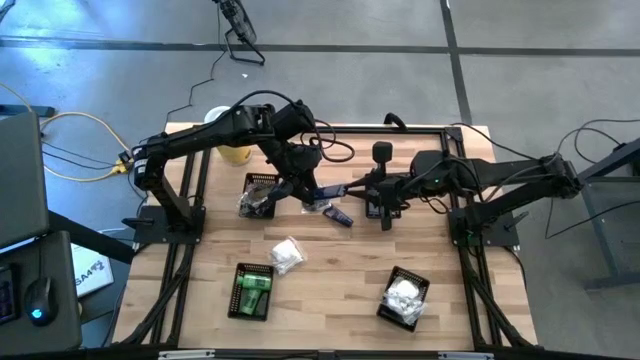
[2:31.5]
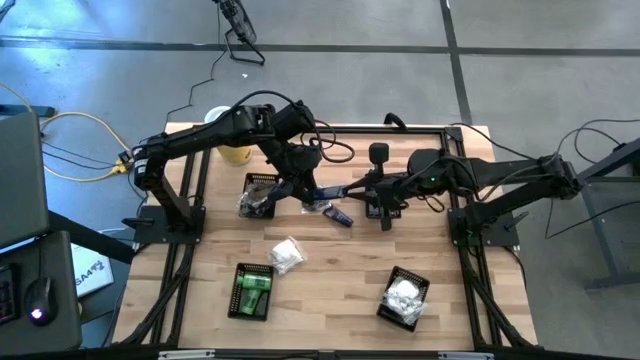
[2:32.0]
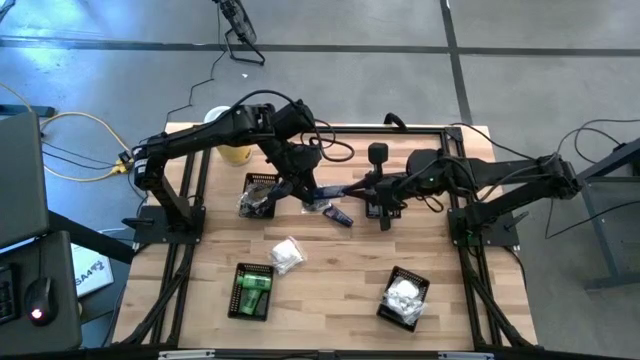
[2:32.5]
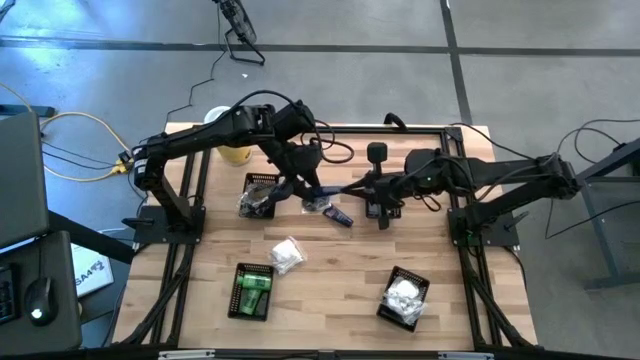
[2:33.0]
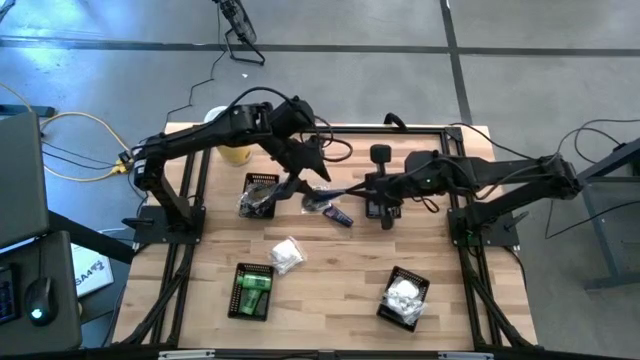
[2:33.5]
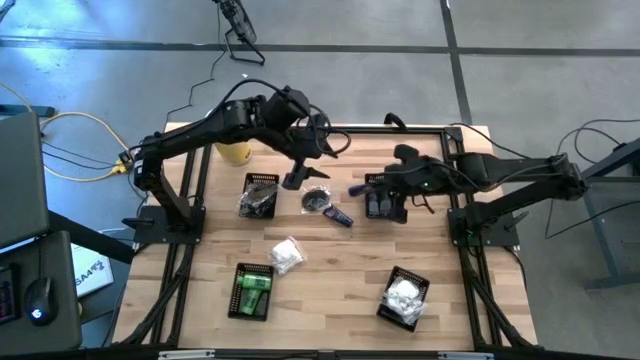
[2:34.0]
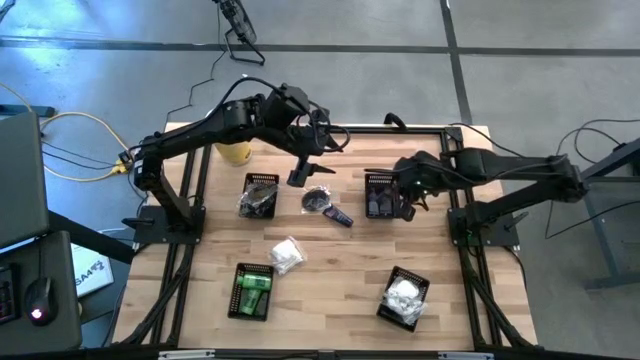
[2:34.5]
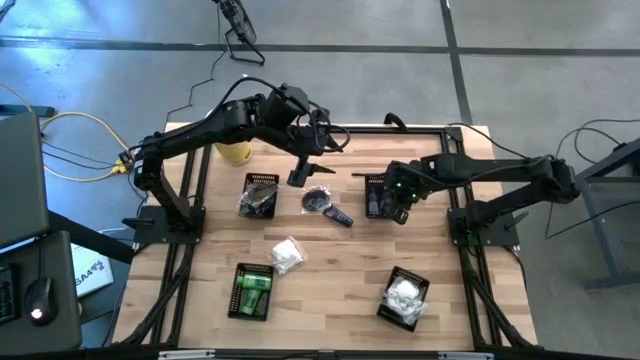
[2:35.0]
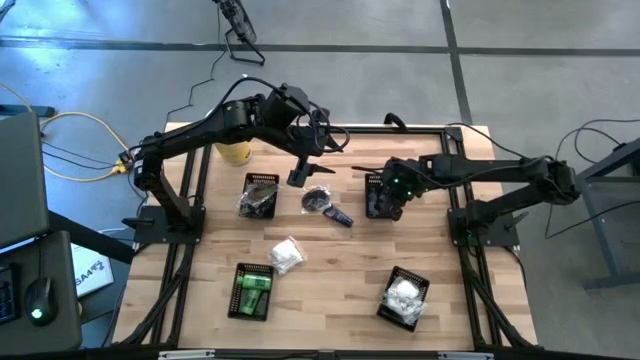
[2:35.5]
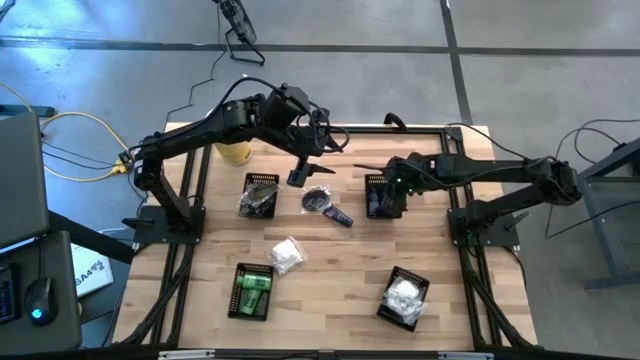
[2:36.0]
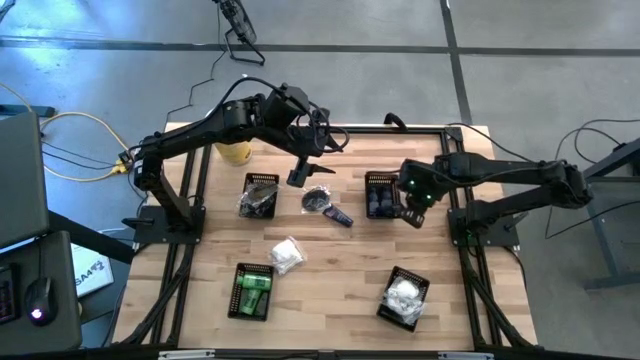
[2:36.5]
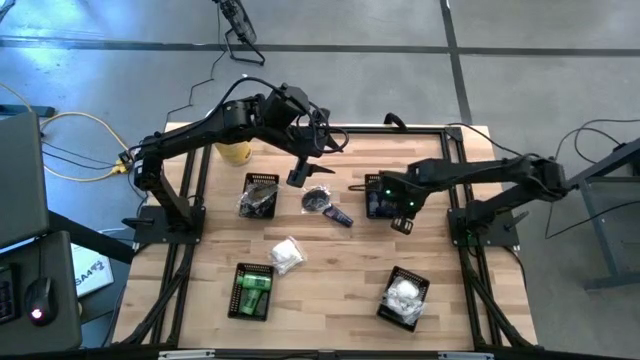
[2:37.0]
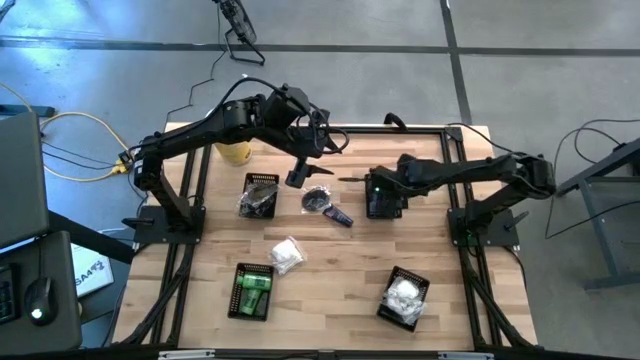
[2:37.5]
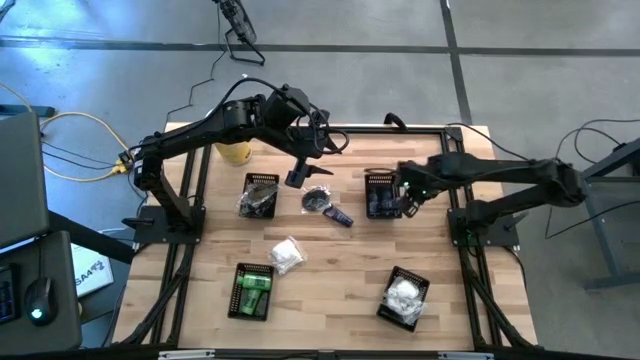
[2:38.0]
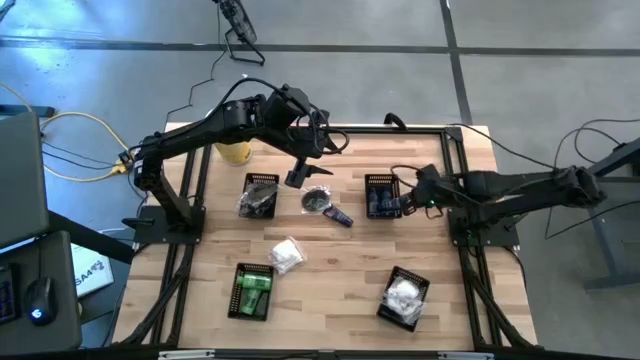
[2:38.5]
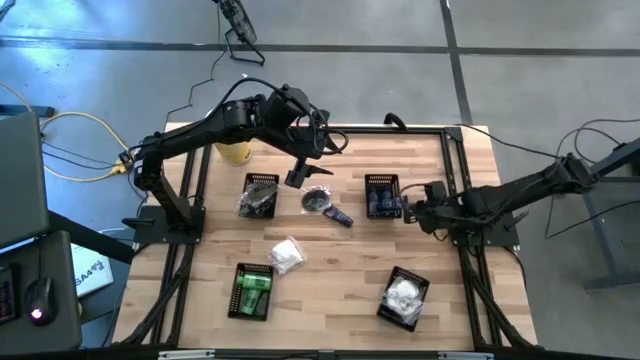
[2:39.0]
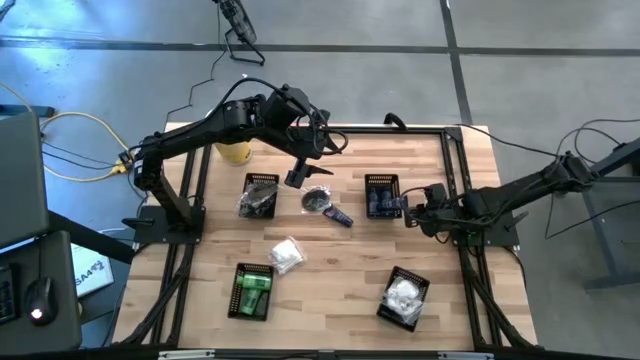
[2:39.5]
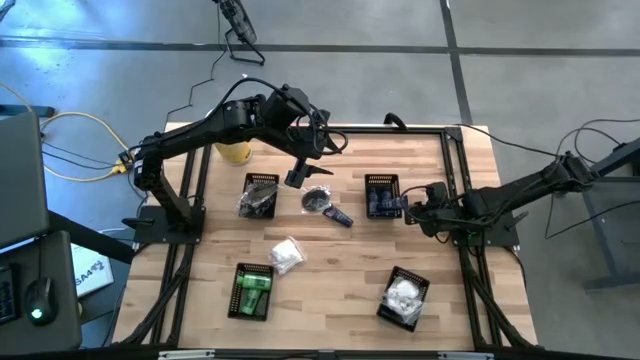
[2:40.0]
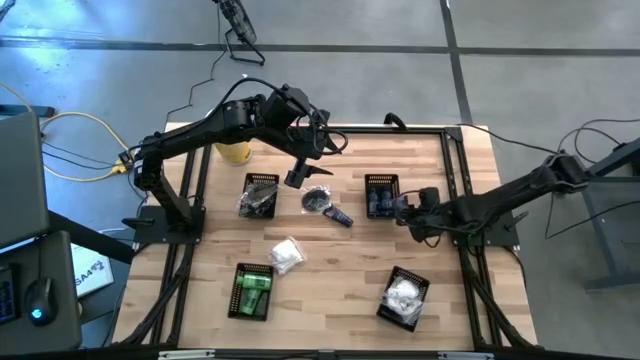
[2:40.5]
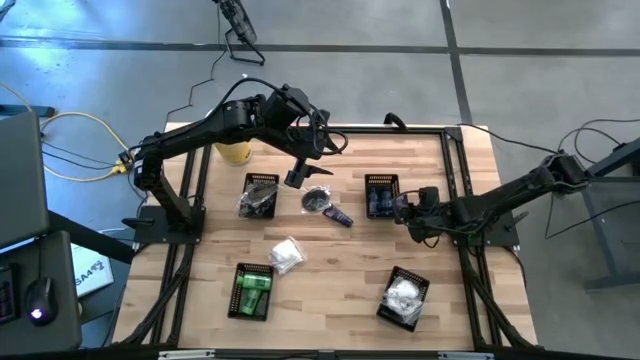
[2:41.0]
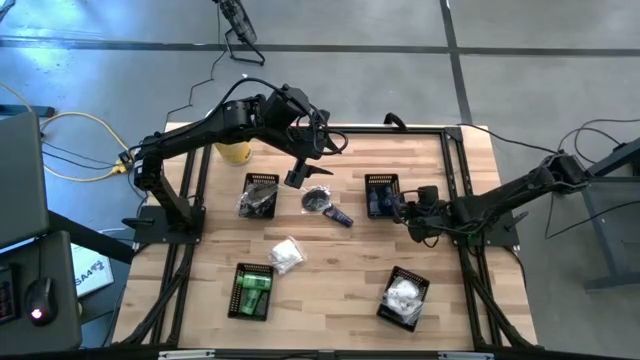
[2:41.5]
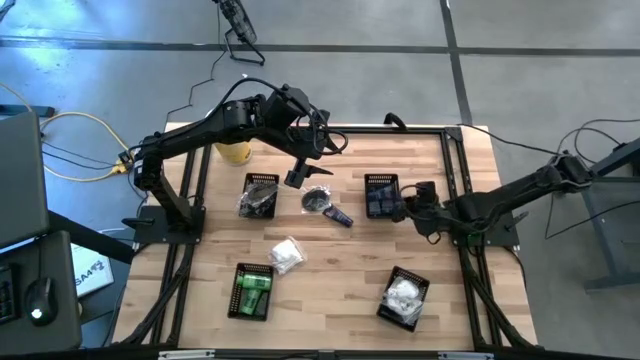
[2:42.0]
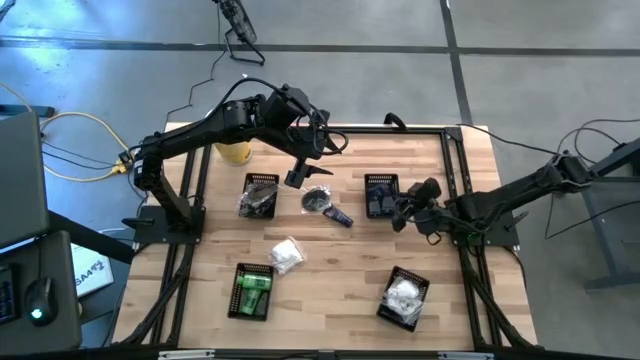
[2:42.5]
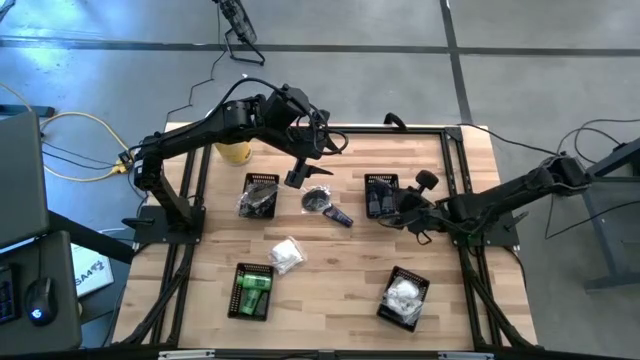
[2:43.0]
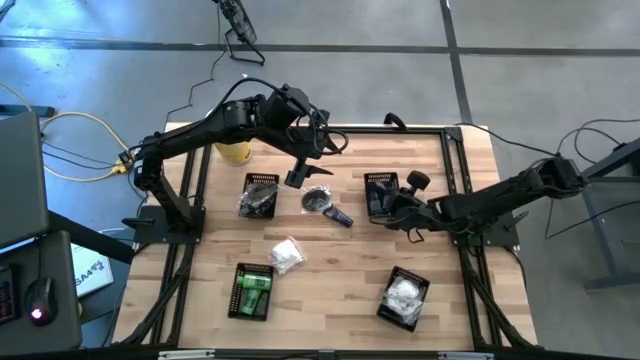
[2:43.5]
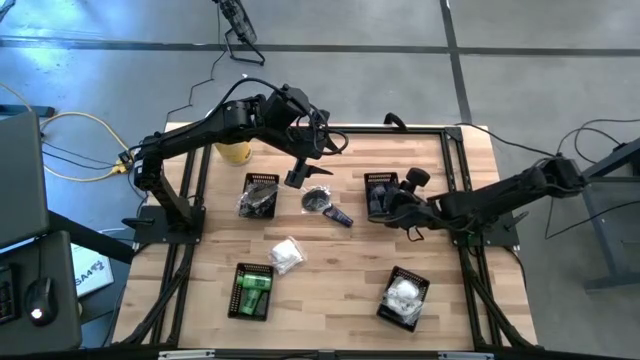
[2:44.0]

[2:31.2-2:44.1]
Task: Pick & Place Travel size toiletries
Put the blue shave cream into the top right black basket

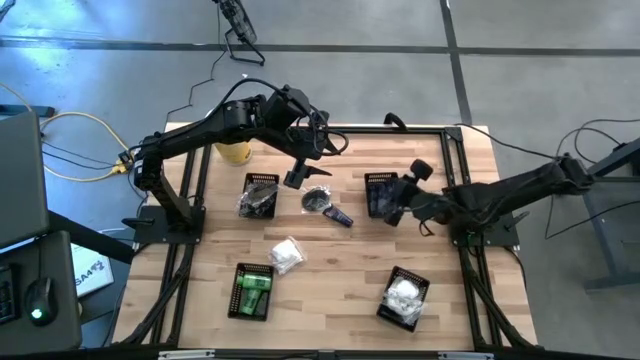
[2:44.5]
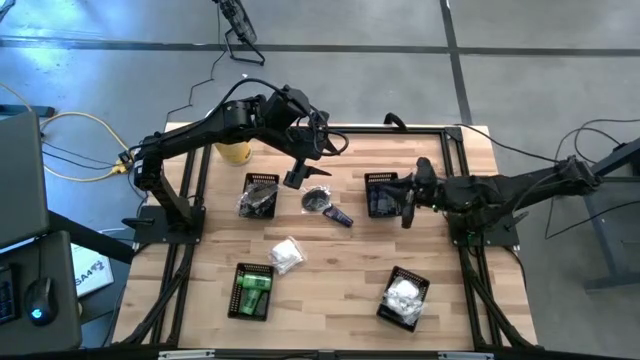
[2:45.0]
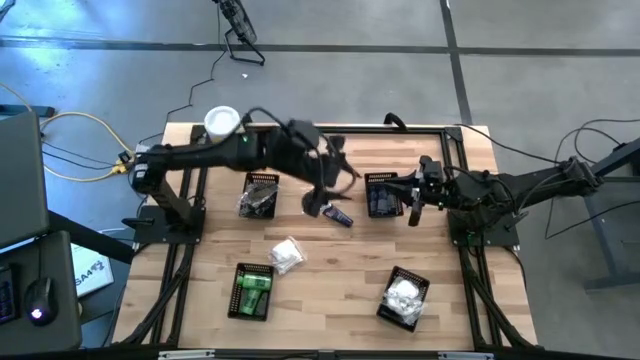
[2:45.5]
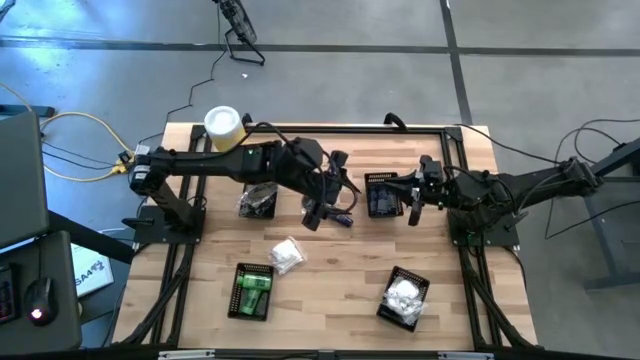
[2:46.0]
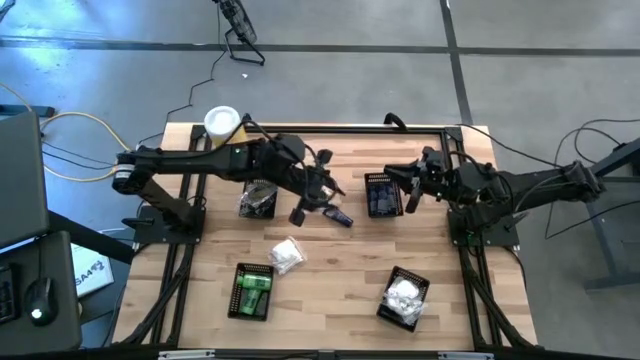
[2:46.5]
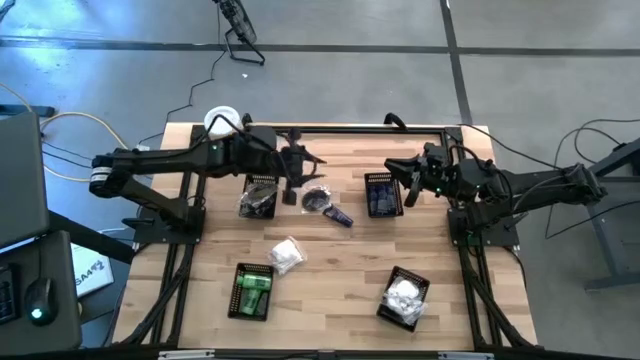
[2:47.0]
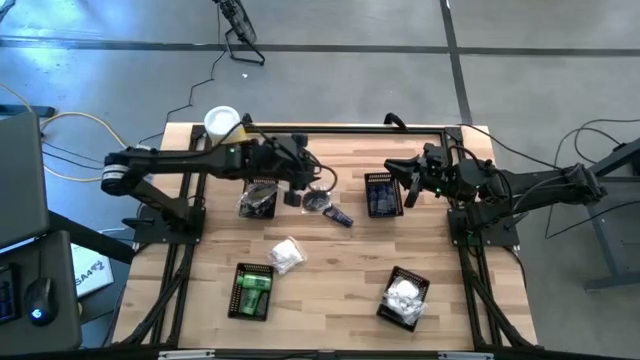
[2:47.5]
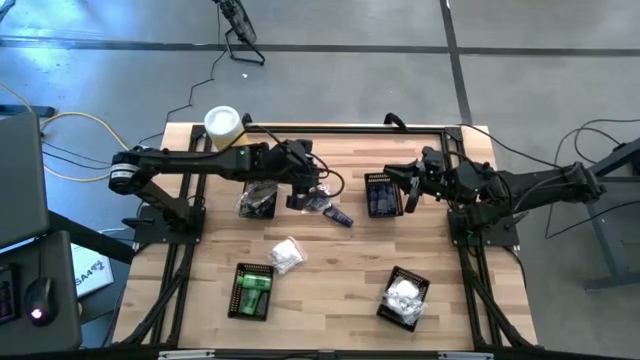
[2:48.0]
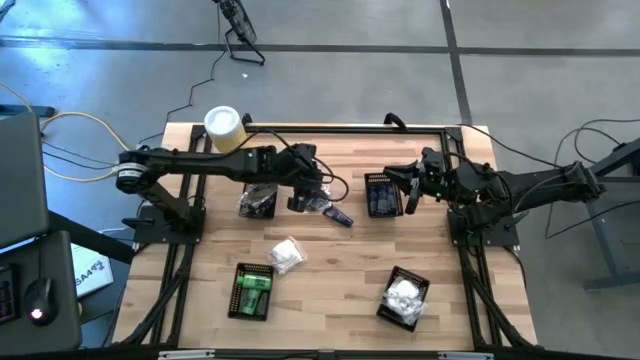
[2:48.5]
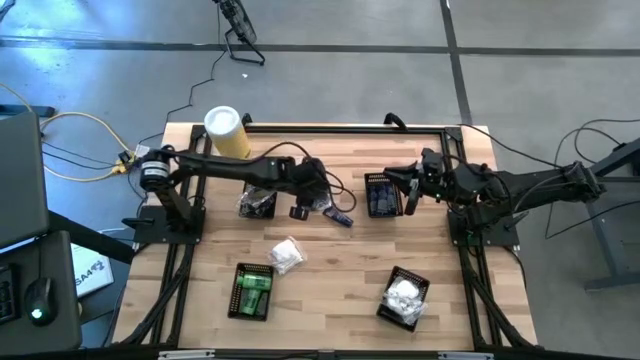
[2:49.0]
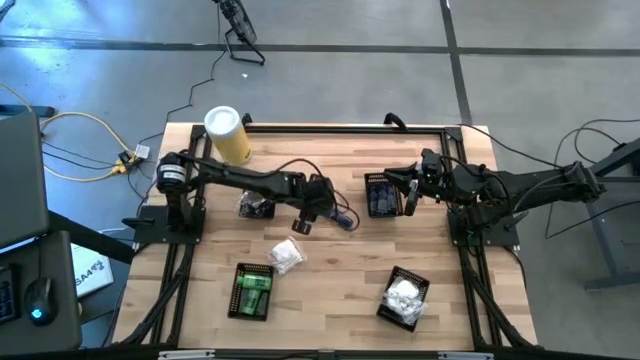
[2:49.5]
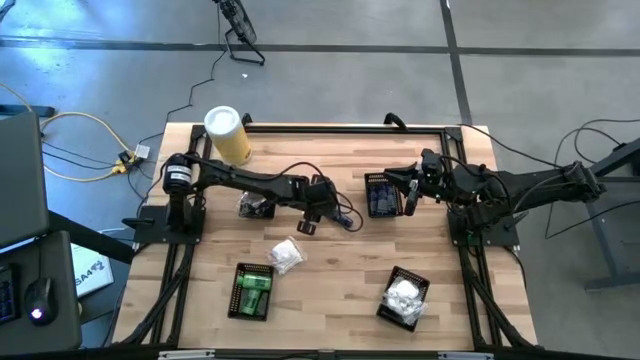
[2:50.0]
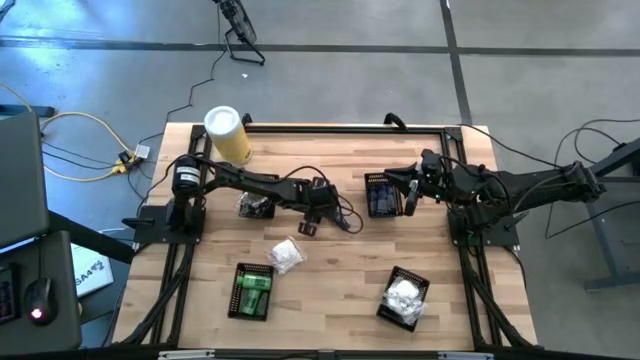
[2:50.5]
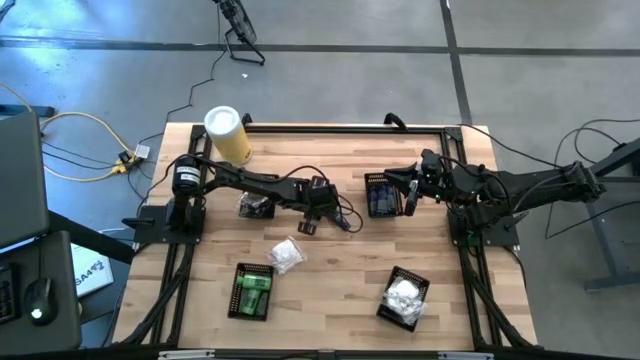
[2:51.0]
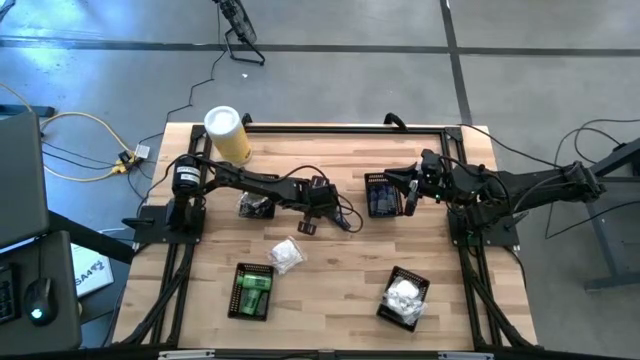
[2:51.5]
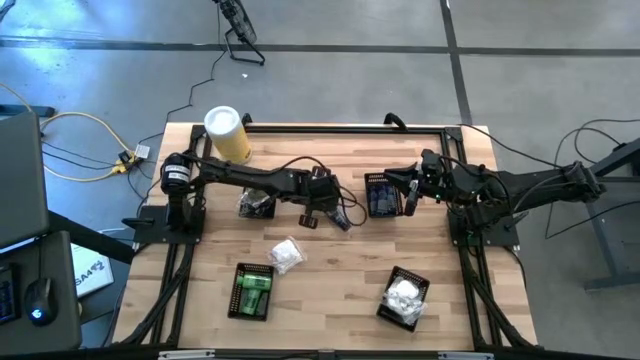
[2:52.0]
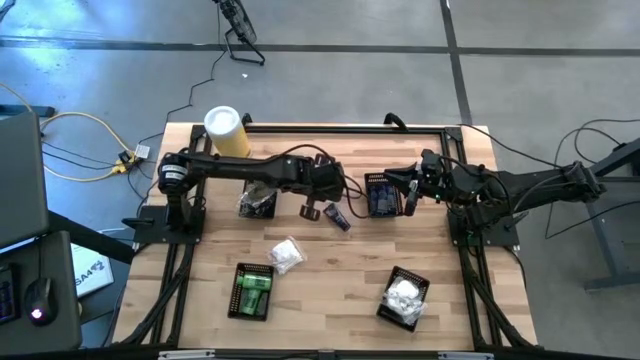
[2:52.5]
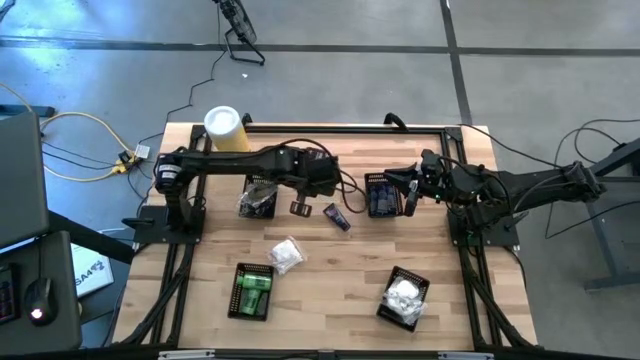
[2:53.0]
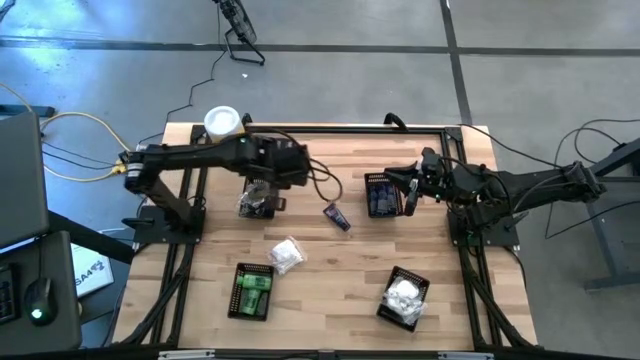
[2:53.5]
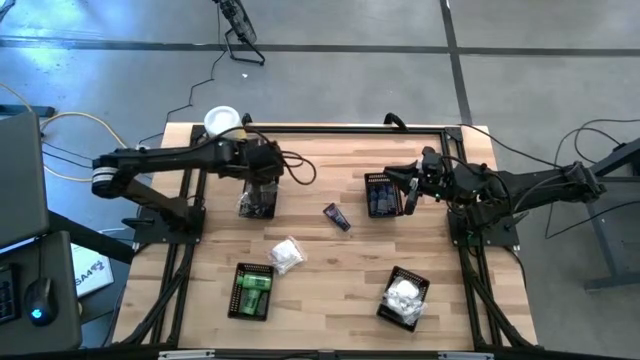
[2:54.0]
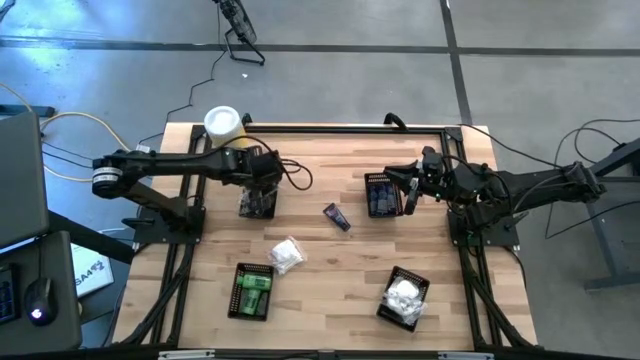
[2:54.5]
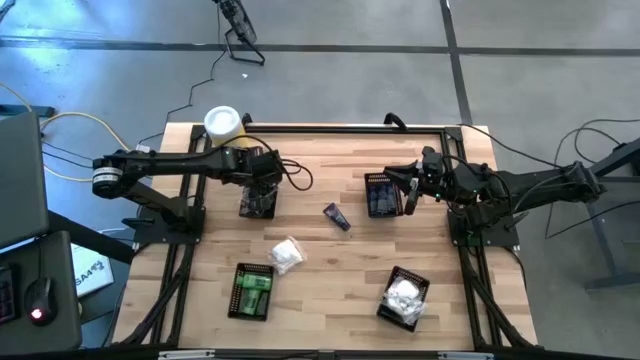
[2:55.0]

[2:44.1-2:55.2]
Put the black hairbrush into the top left black basket
